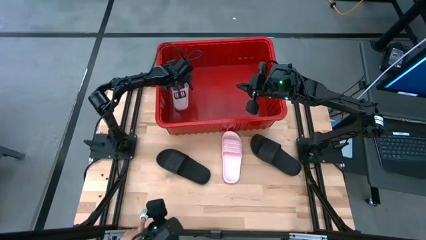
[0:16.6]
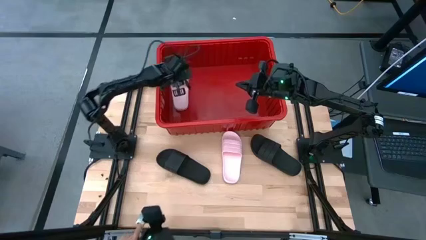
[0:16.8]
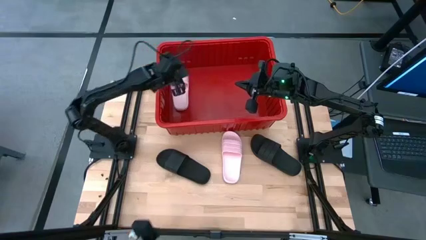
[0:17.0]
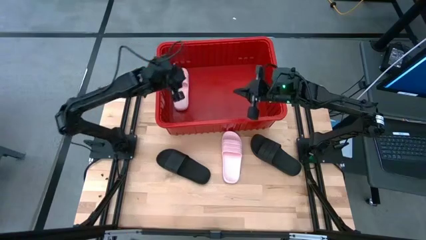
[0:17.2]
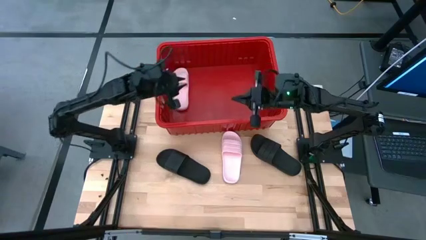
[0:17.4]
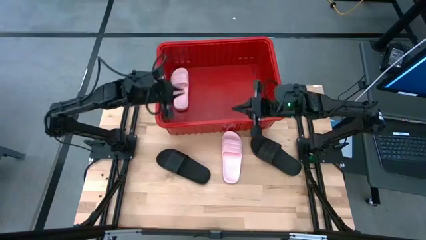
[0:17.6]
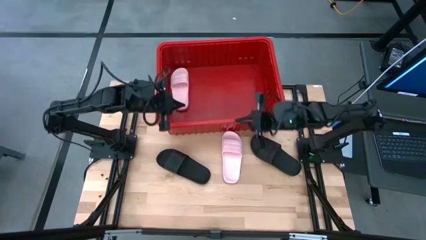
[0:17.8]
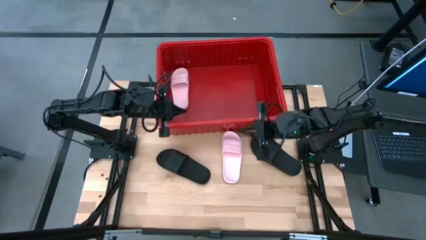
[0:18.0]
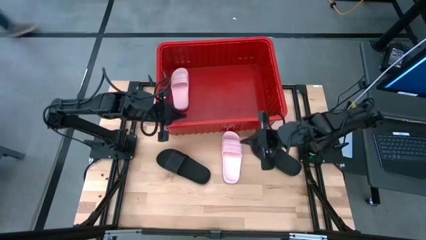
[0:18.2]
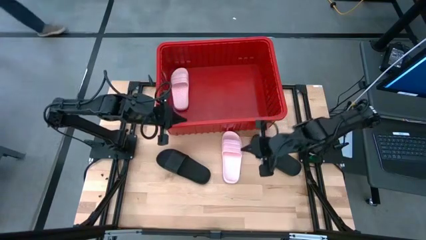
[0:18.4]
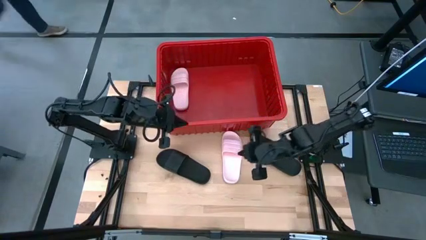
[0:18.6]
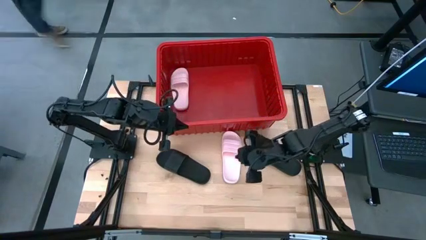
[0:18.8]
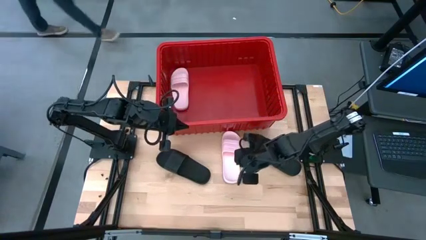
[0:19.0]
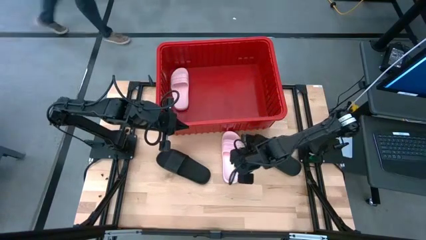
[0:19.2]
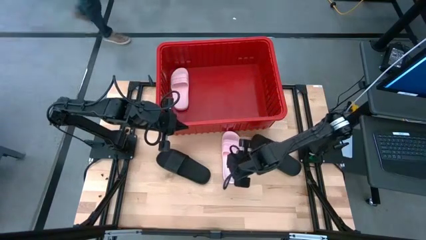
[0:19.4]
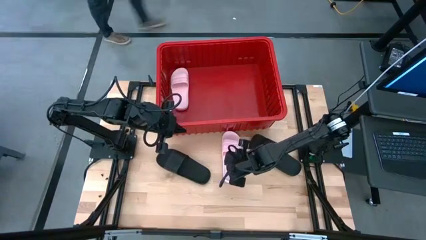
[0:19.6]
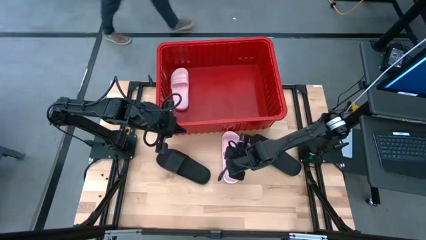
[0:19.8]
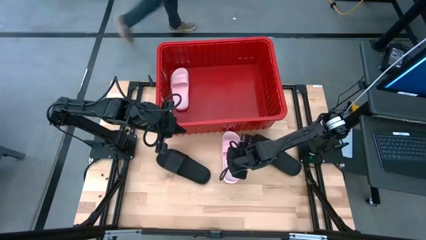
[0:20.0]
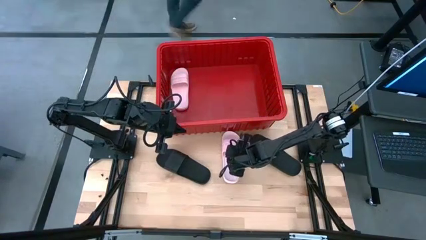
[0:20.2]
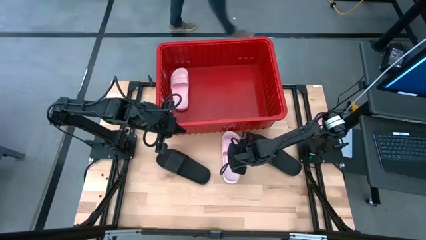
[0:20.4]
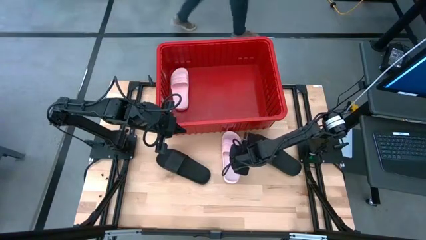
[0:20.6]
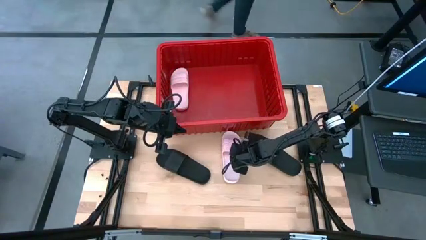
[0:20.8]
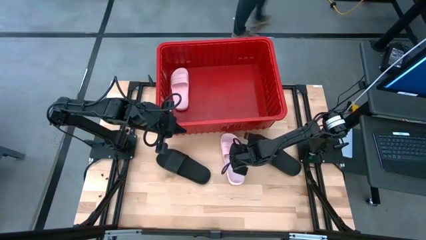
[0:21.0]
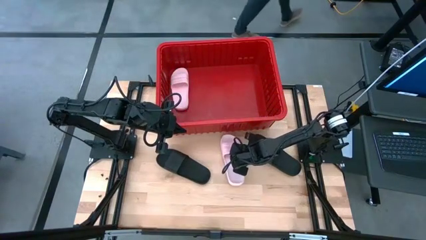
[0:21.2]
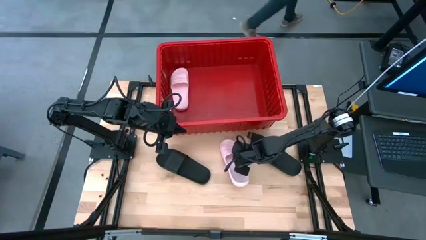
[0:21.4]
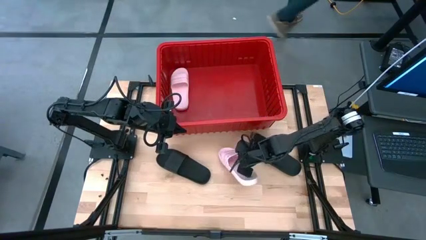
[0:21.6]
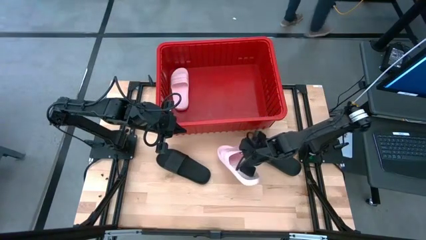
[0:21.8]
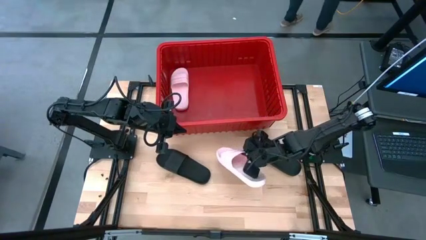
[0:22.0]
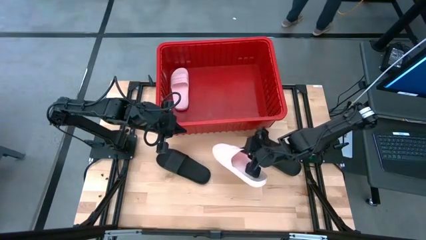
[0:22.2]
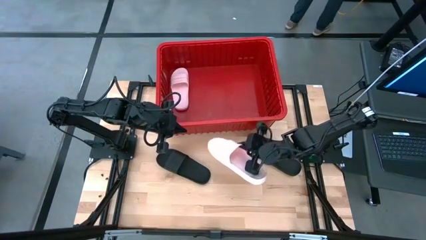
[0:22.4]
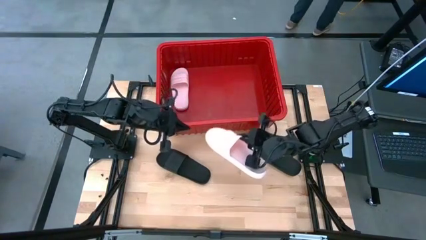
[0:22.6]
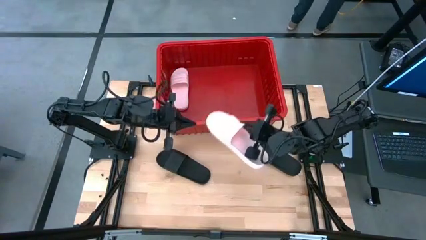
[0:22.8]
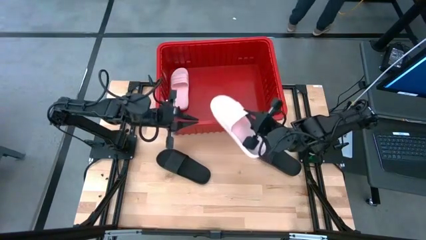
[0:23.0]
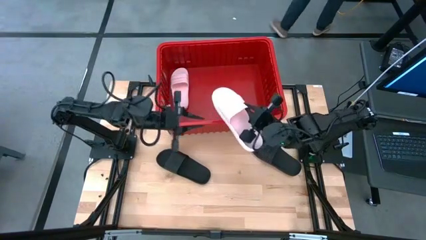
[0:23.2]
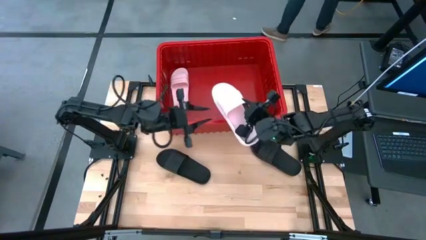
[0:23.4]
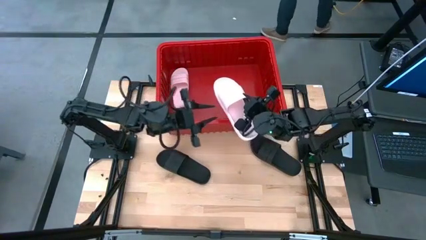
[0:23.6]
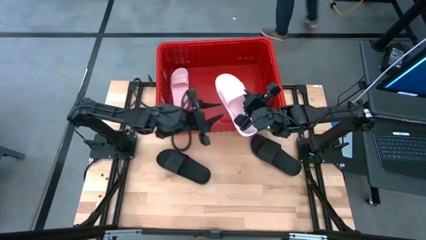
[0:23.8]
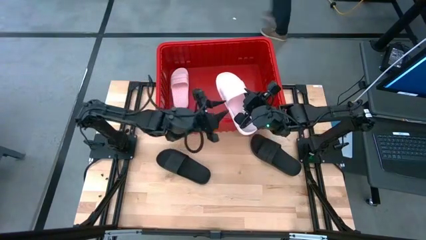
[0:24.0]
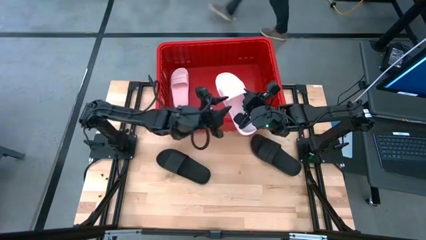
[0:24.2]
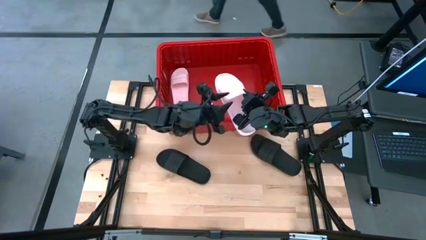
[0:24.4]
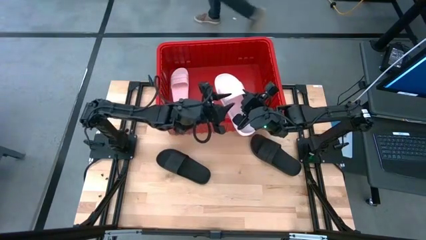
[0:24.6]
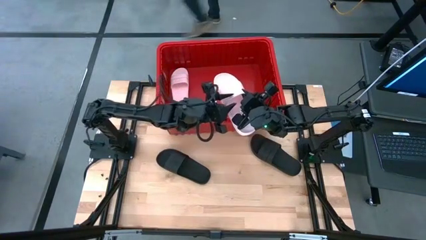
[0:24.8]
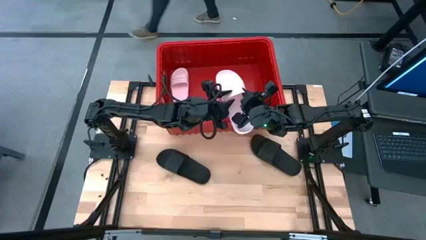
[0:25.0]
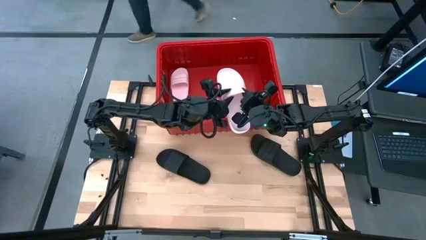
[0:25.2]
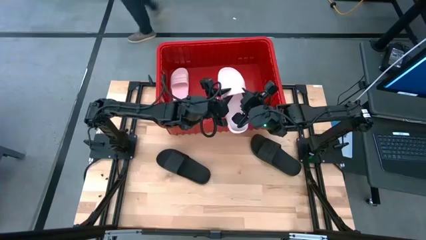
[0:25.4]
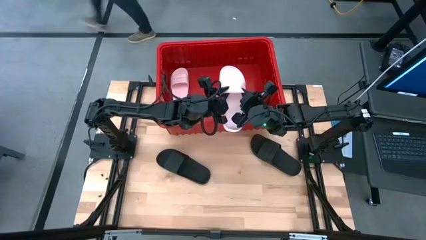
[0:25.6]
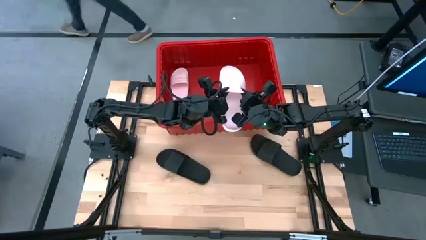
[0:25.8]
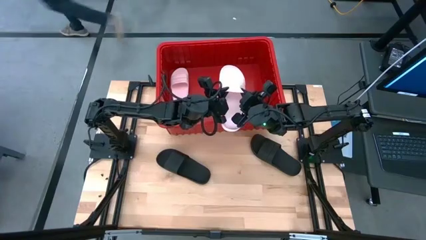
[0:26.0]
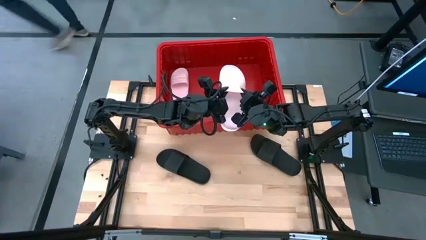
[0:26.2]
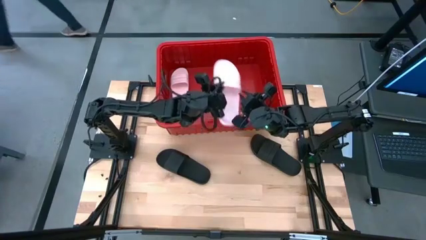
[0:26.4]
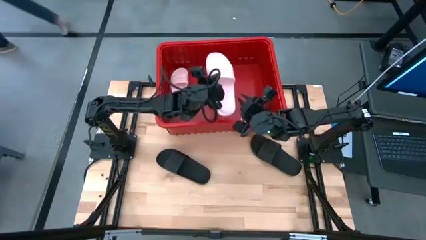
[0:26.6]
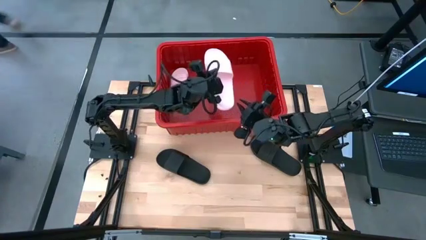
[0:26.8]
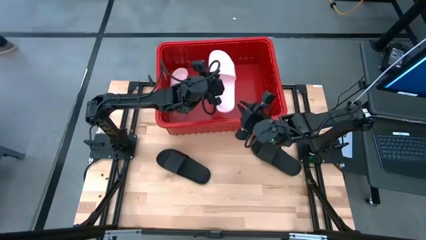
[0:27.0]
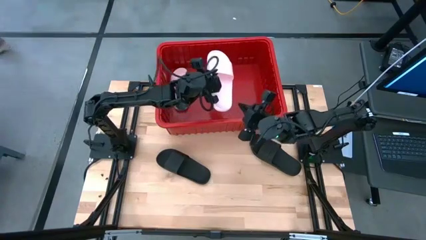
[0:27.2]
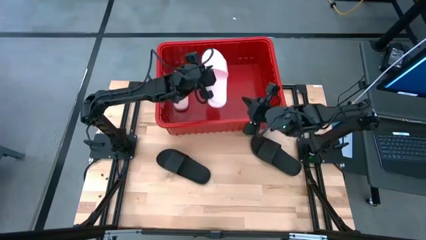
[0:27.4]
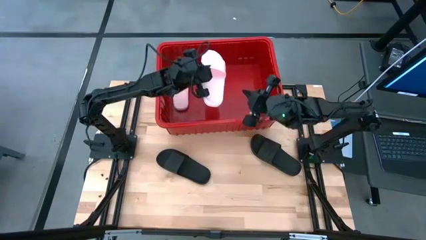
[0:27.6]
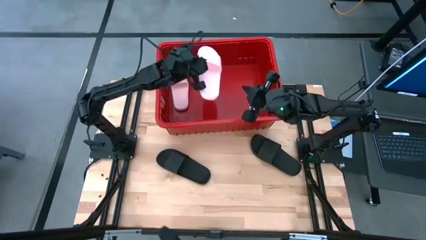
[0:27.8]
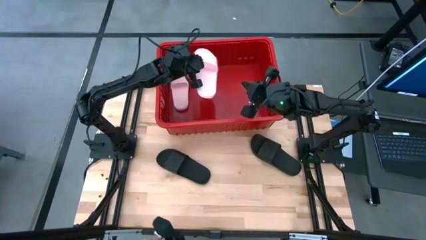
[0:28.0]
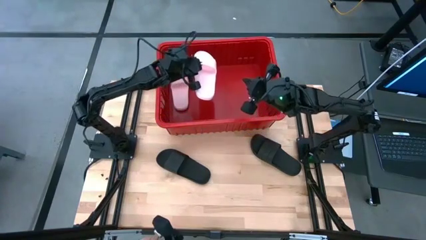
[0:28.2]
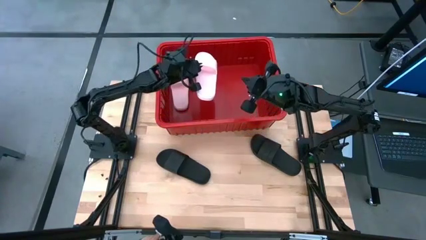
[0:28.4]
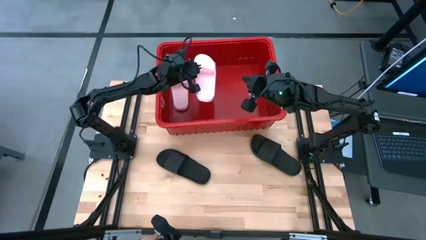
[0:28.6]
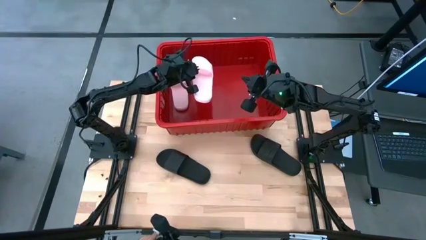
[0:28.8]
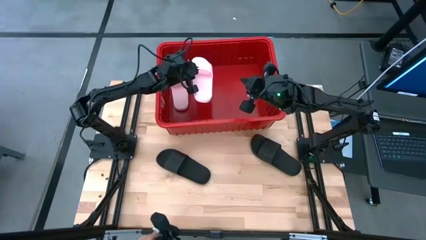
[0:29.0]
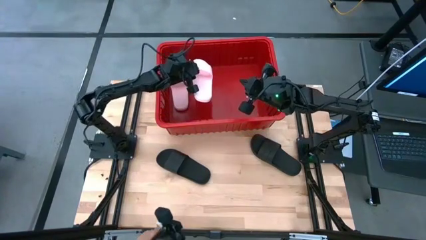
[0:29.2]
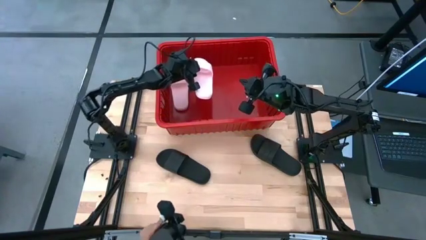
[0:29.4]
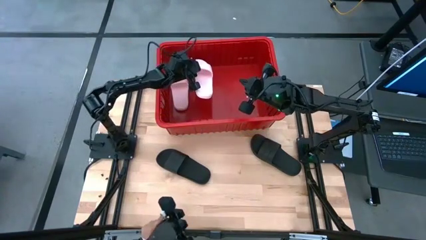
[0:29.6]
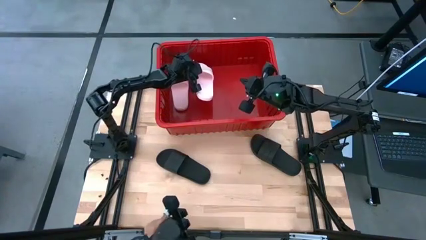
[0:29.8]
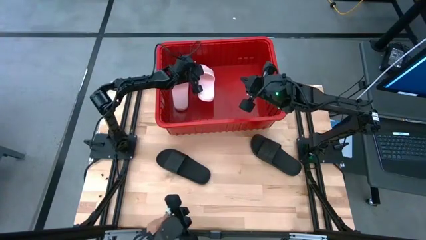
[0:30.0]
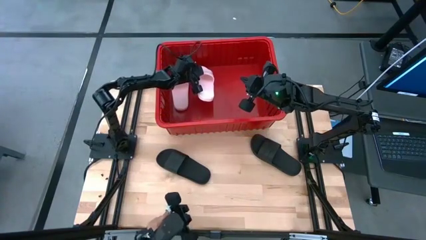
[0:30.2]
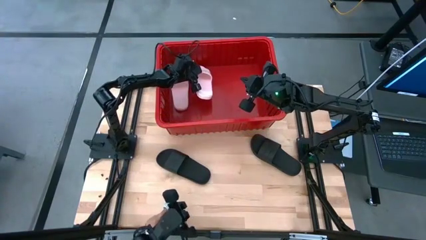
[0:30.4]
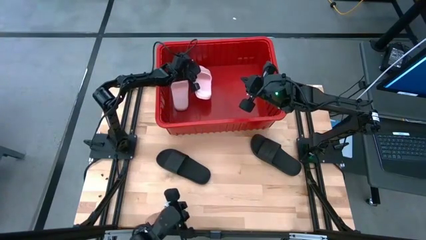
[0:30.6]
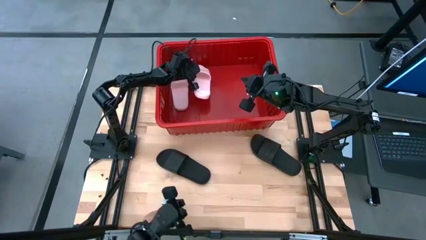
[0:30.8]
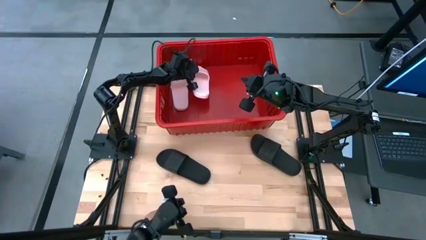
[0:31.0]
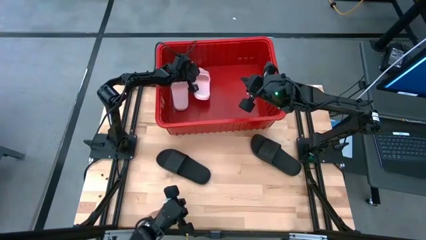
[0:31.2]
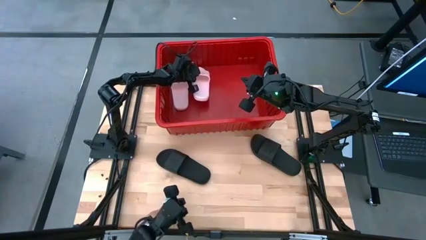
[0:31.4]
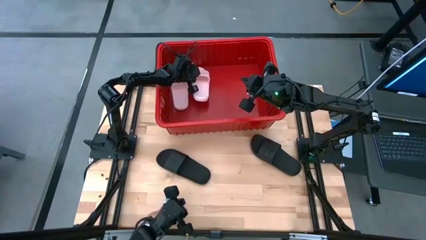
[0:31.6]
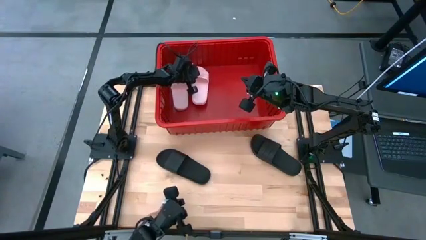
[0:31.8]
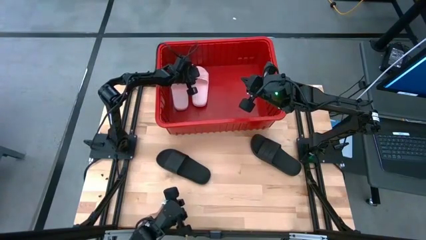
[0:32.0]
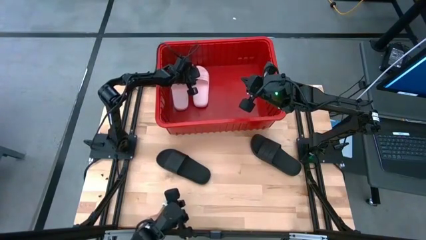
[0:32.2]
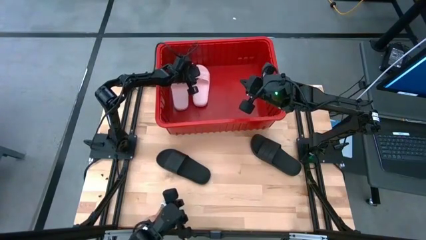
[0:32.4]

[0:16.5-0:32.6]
Task: Pick and place slides into bin
Put the pink slide into the red bin
